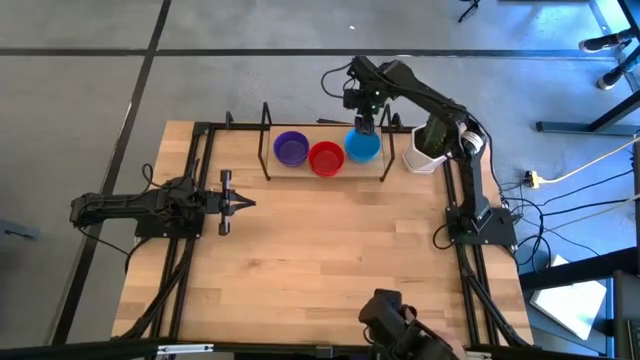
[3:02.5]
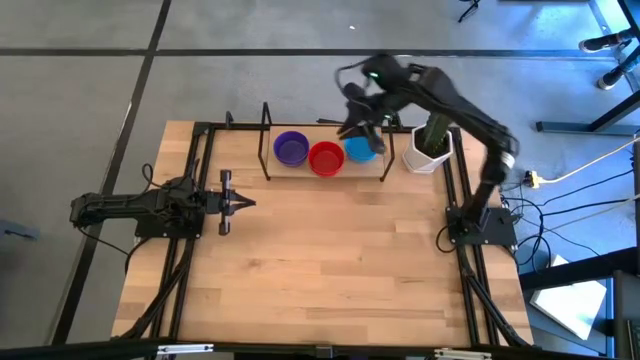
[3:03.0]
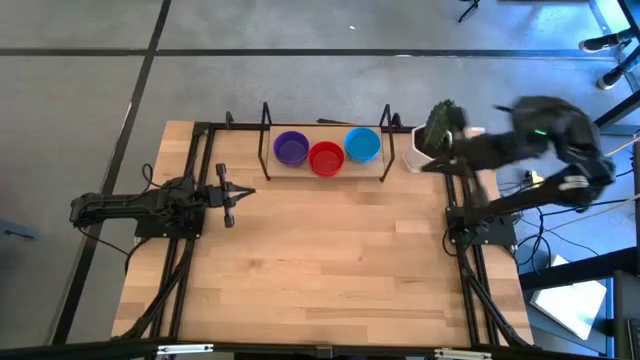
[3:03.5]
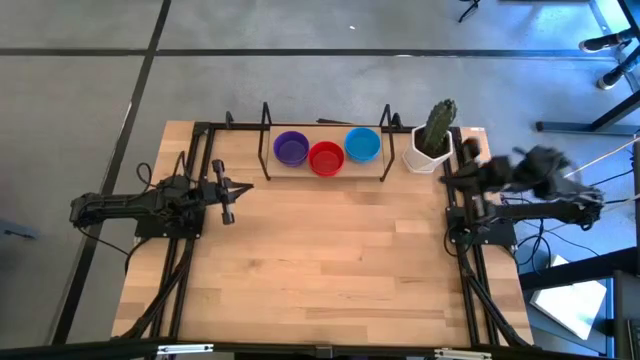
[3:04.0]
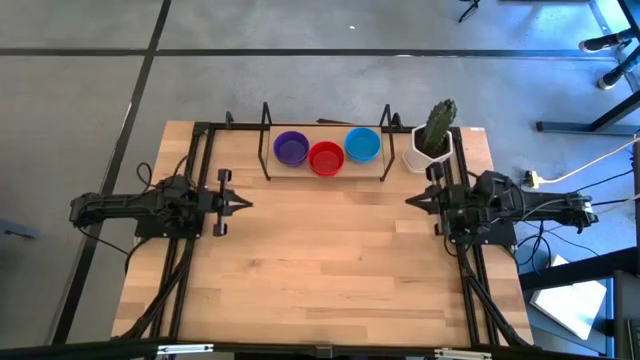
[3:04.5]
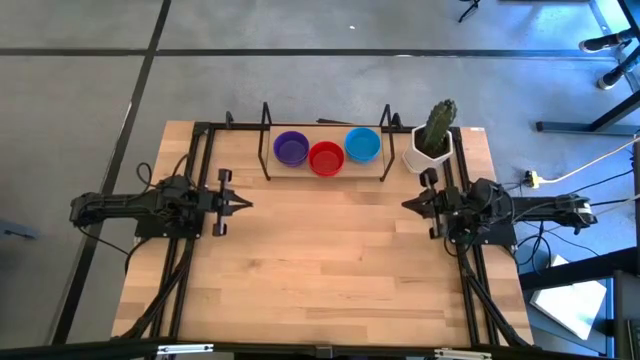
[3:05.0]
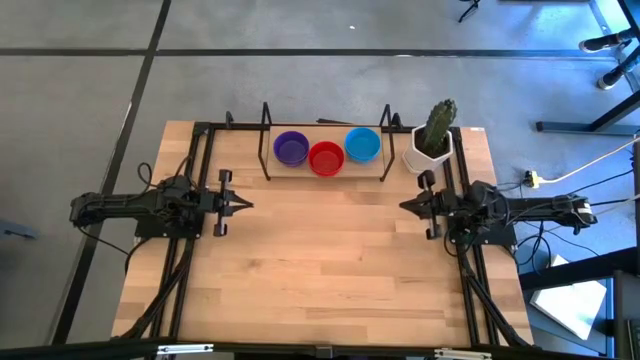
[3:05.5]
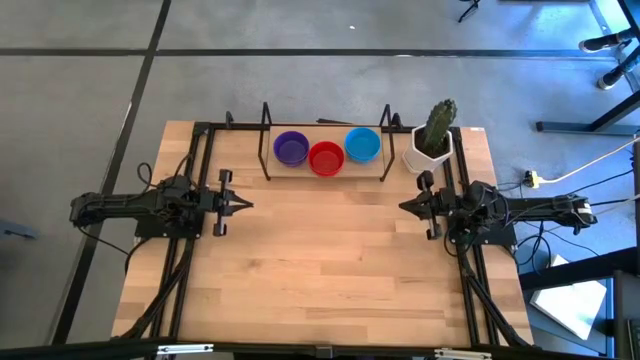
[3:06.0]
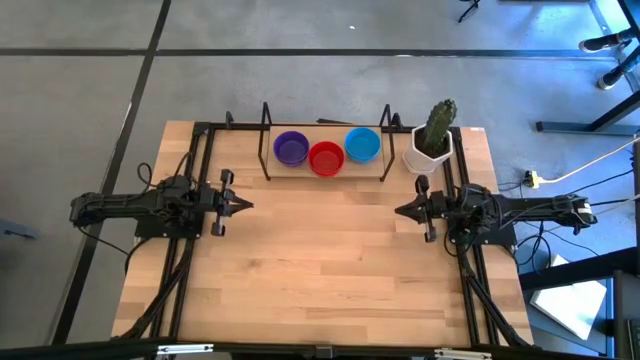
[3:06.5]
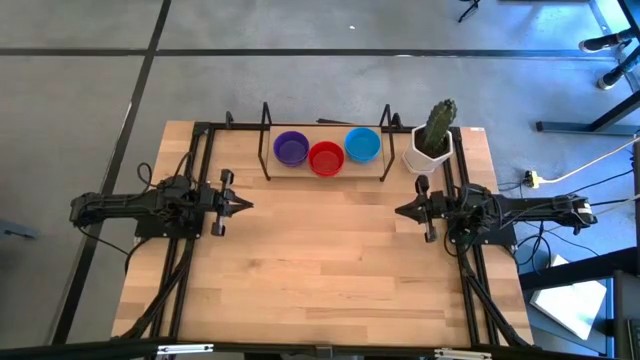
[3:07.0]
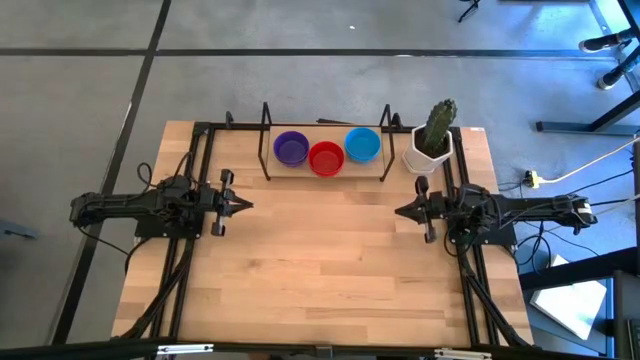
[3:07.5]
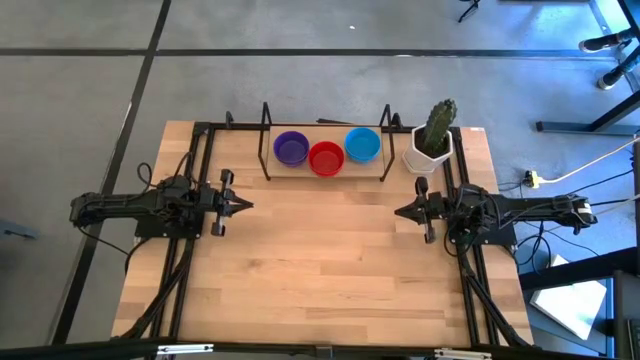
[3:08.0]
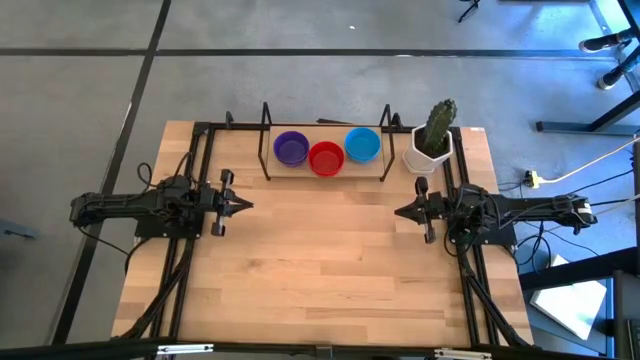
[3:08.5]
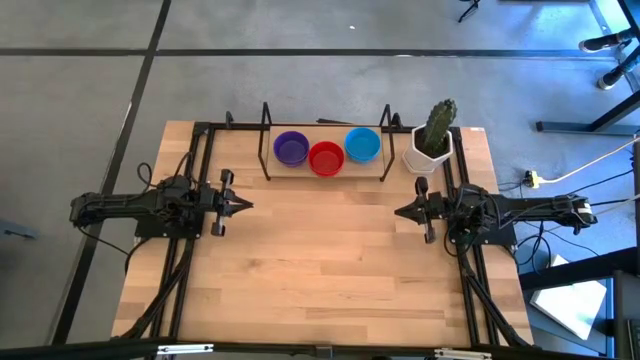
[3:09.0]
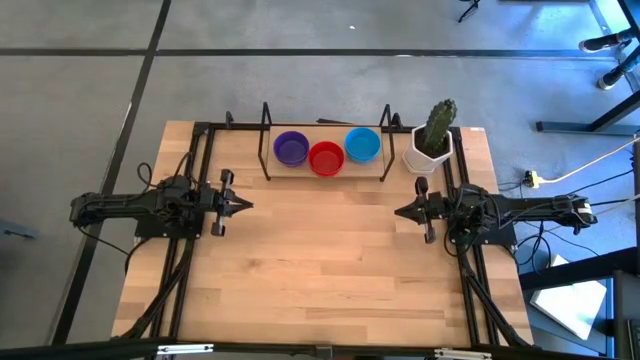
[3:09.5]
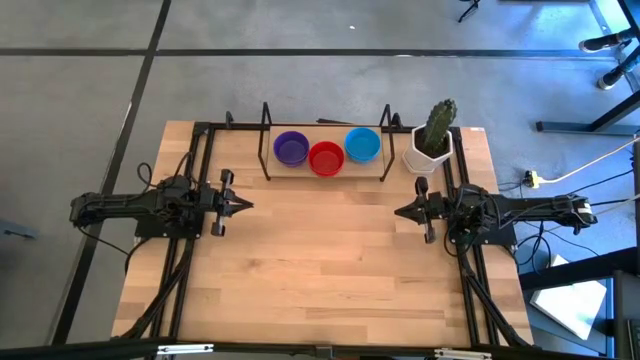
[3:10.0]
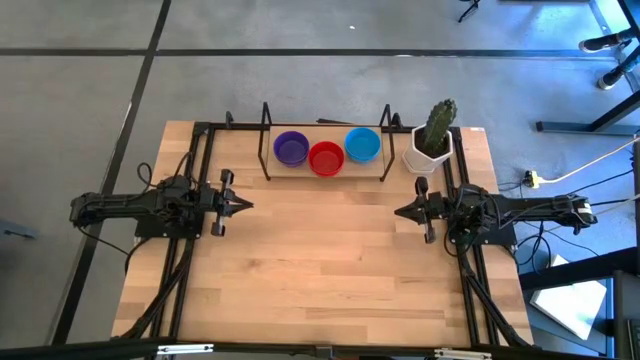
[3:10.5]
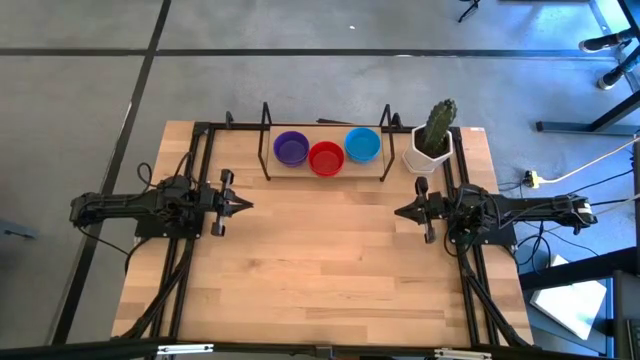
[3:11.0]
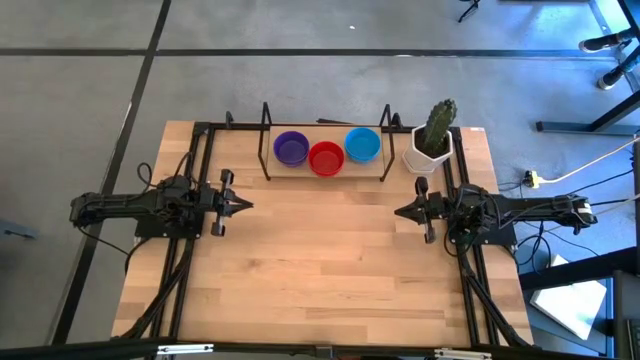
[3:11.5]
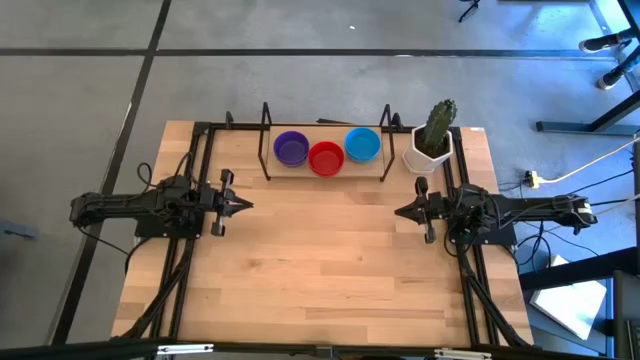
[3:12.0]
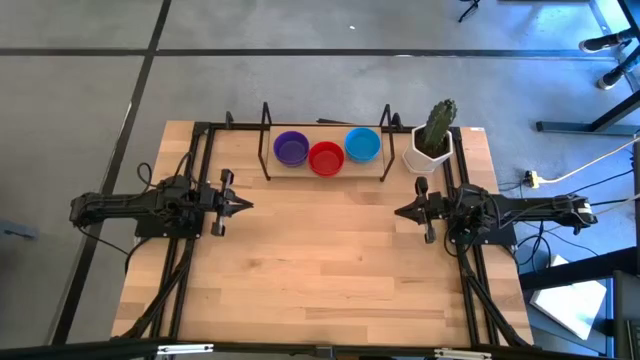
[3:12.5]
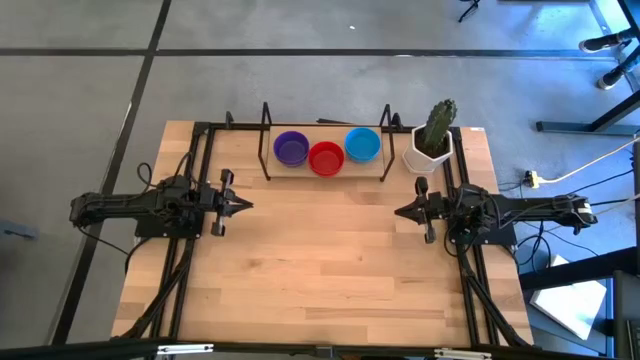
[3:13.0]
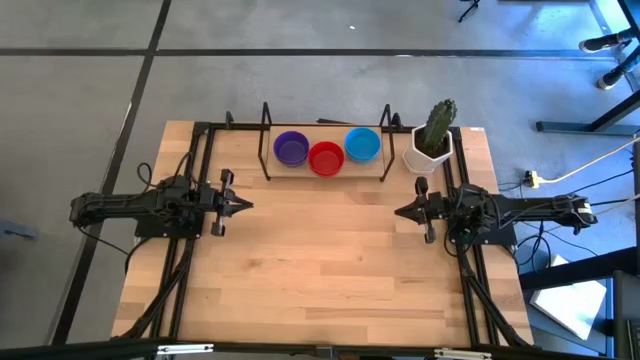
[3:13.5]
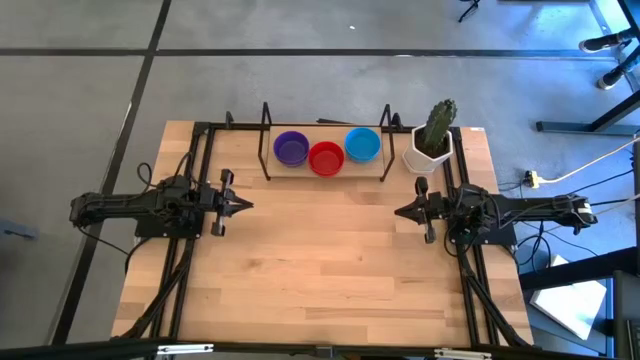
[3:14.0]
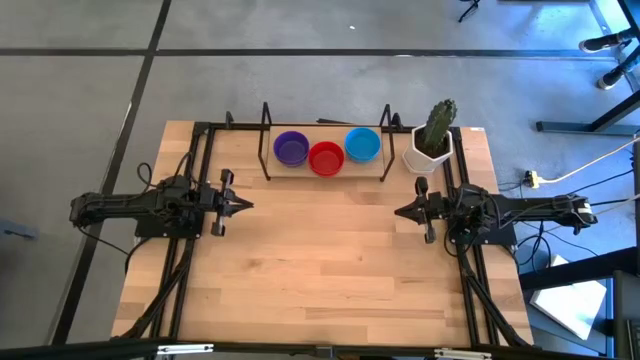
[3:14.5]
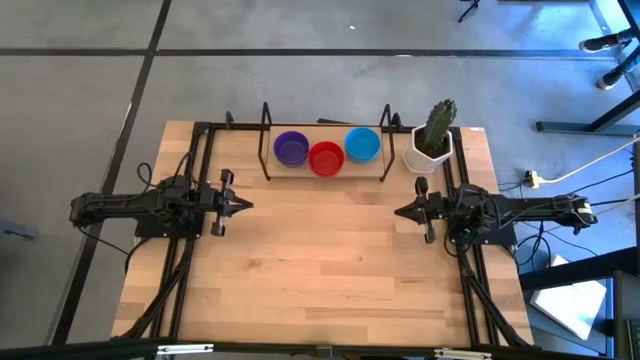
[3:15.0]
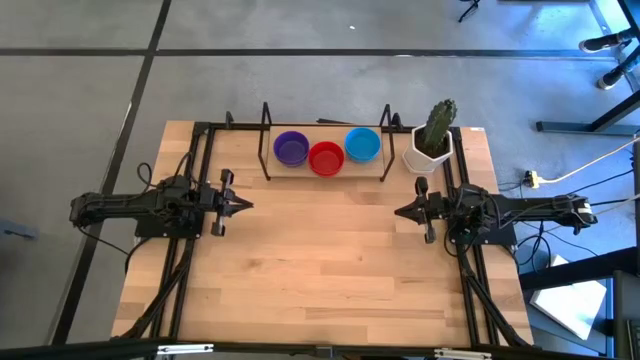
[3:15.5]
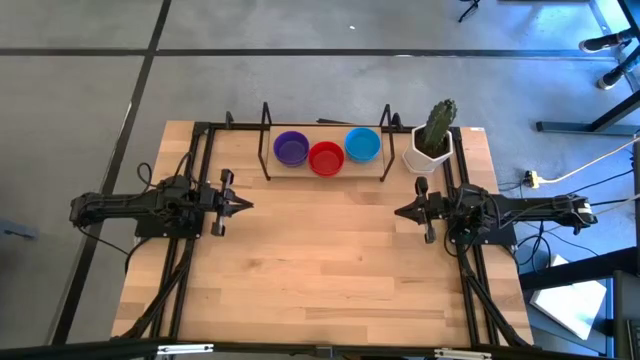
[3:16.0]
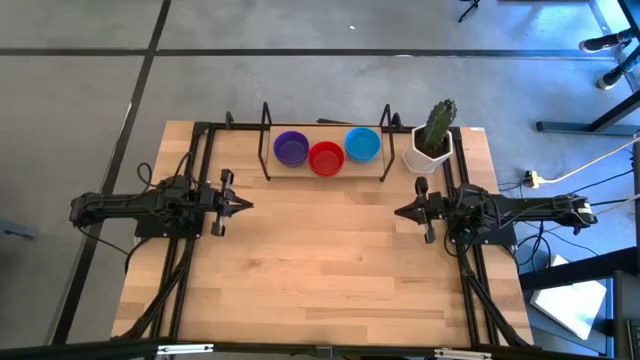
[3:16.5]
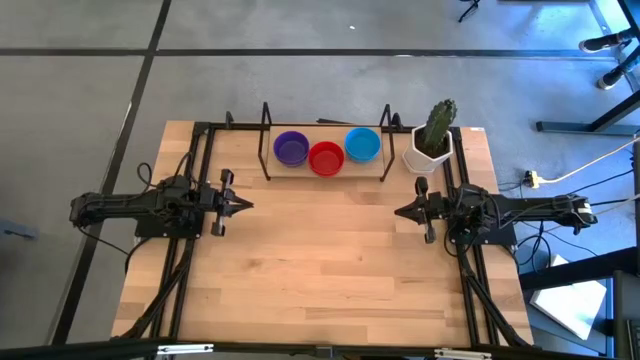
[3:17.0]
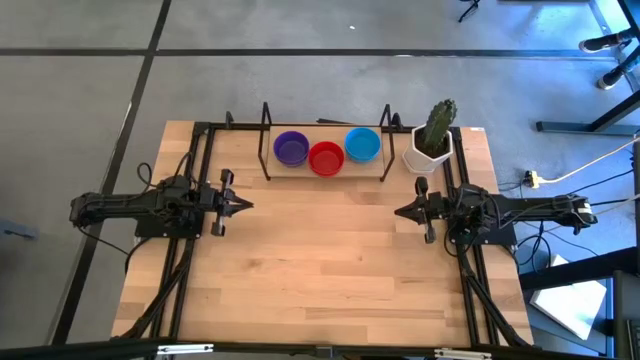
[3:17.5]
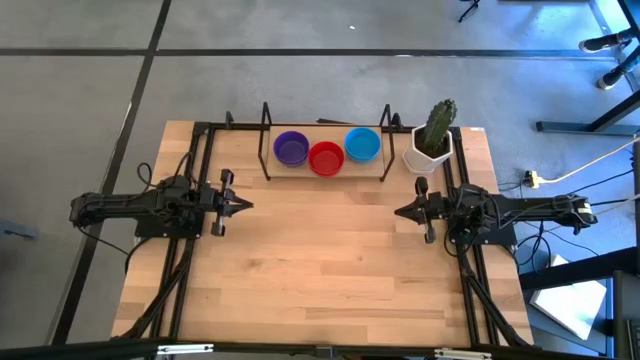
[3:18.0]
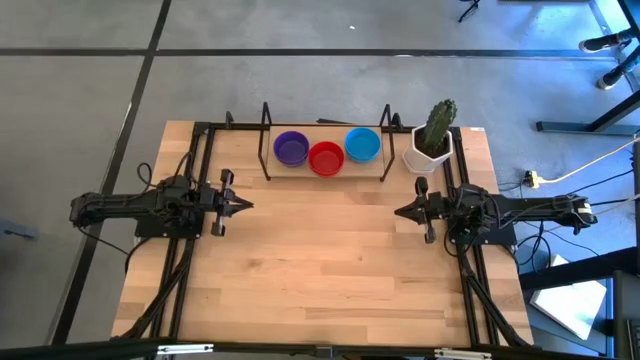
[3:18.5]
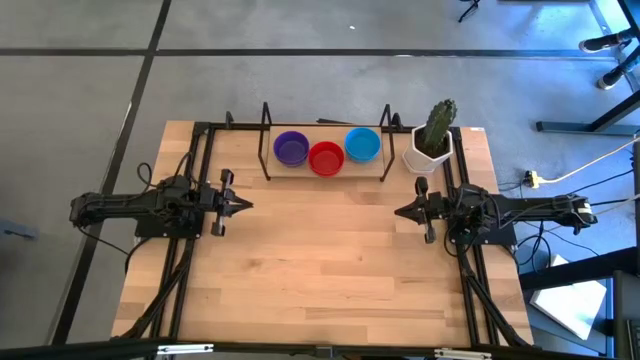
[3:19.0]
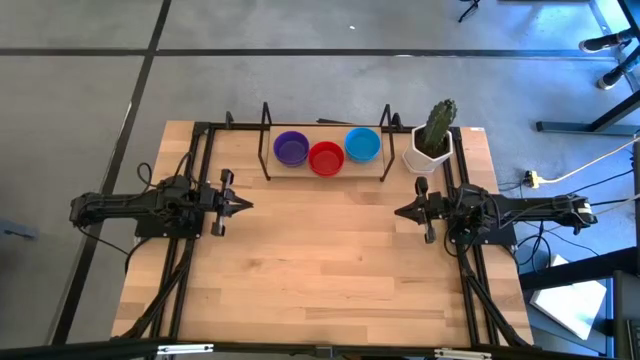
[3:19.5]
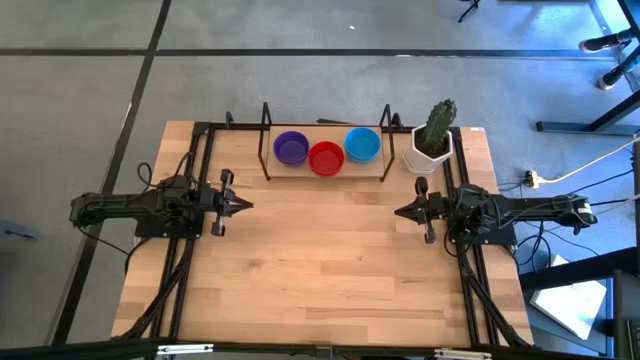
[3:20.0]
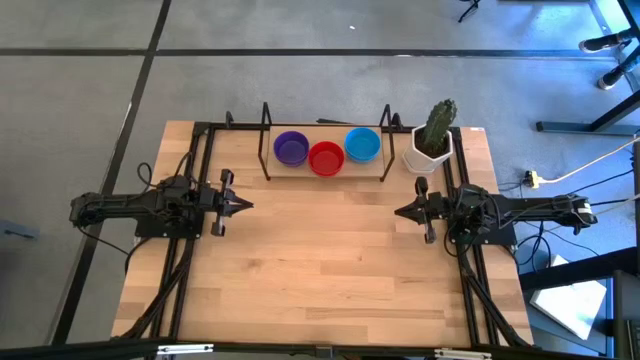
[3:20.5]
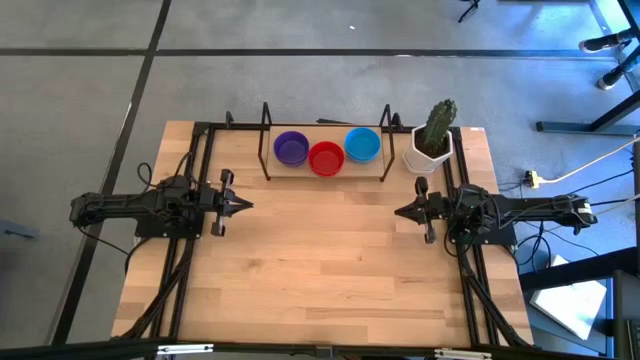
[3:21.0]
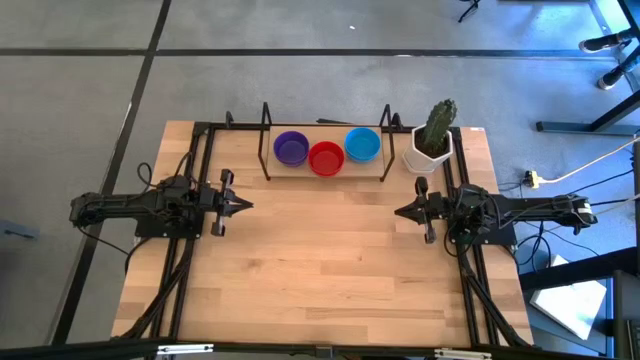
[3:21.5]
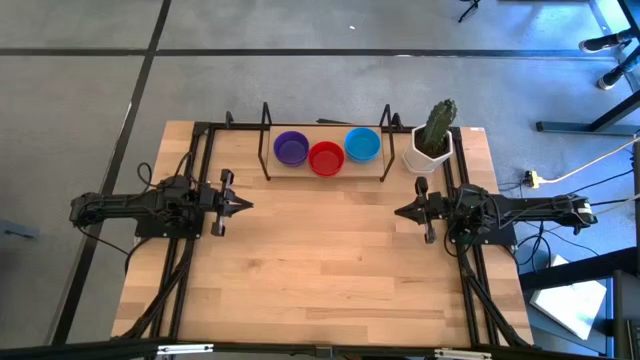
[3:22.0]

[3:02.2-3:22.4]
Task: Pick & Place Mini bowls
Return to Home Position

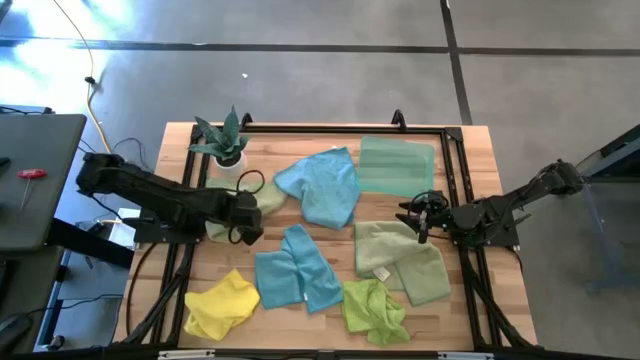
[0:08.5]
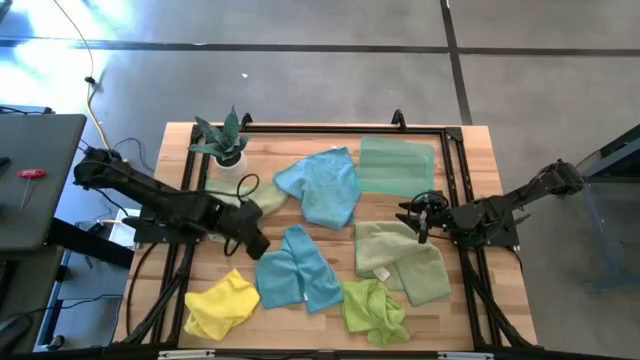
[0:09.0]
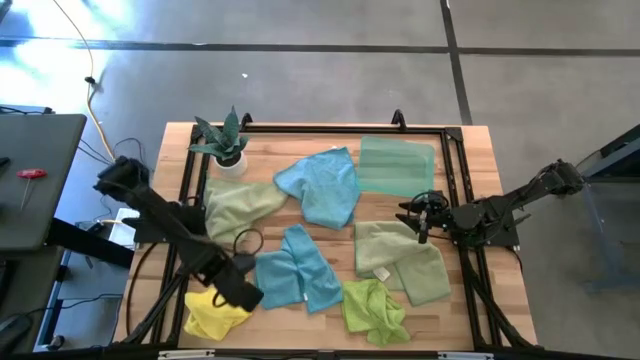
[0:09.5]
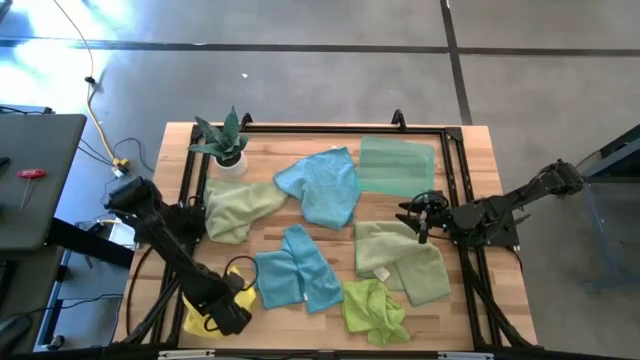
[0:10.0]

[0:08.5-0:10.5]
Task: Fold microfiber towels
Adjust the yellow microfiber cloth
